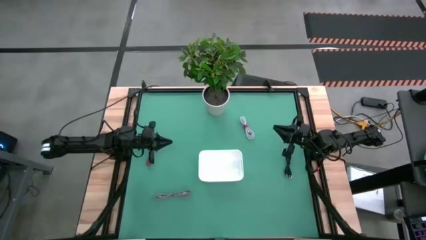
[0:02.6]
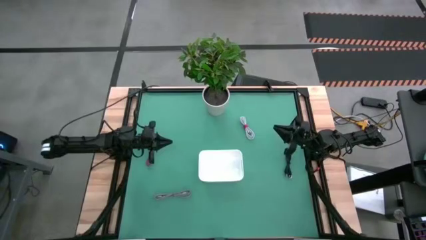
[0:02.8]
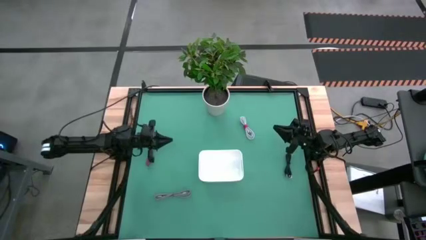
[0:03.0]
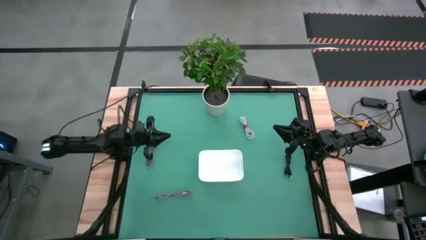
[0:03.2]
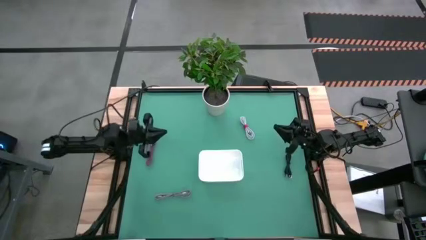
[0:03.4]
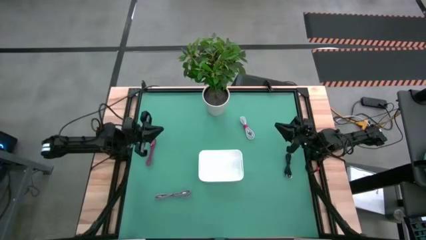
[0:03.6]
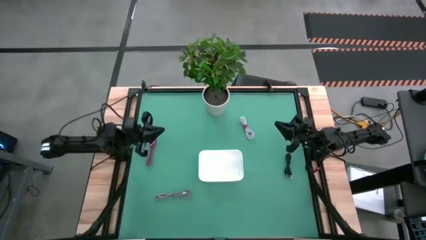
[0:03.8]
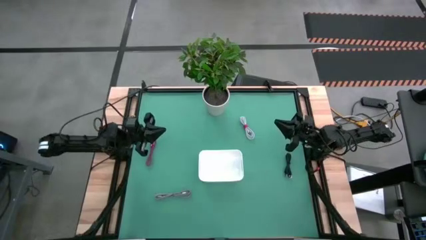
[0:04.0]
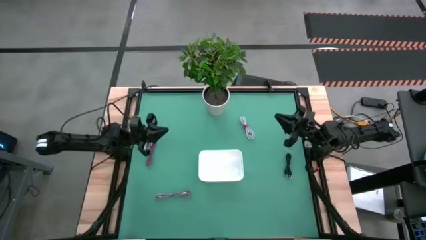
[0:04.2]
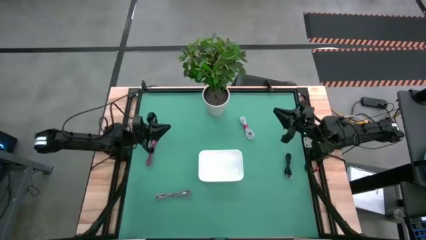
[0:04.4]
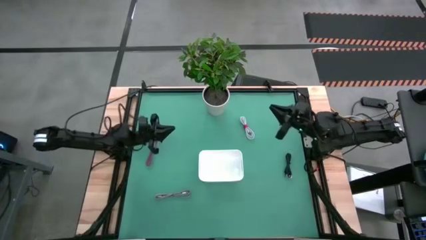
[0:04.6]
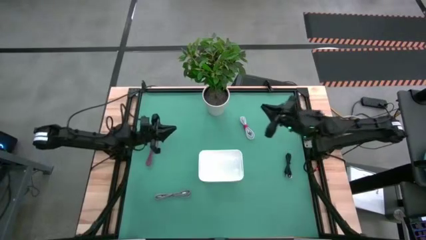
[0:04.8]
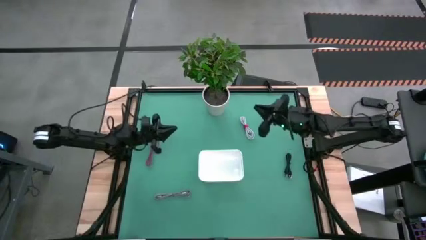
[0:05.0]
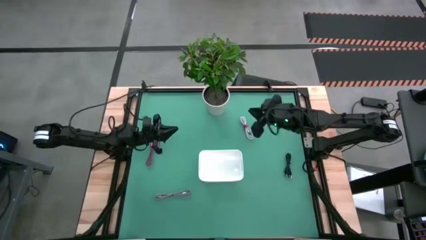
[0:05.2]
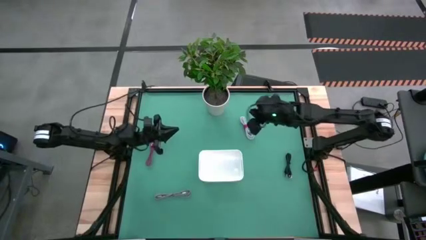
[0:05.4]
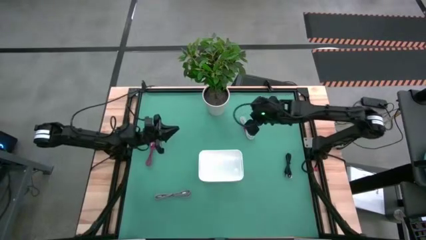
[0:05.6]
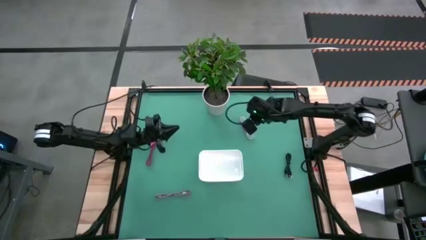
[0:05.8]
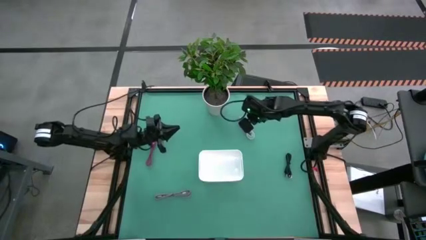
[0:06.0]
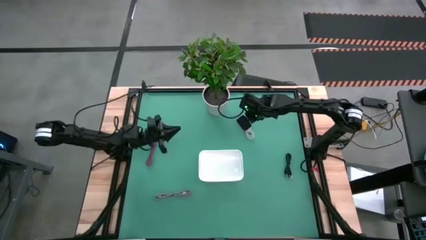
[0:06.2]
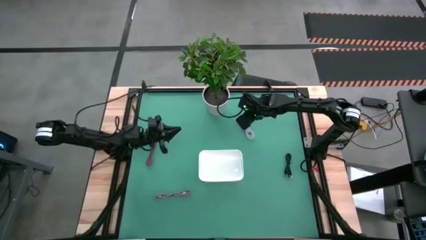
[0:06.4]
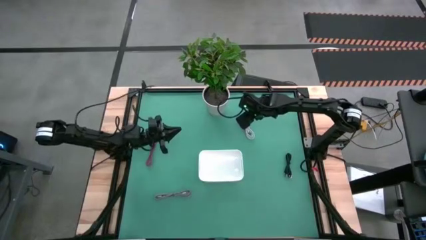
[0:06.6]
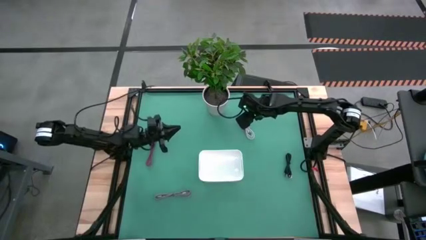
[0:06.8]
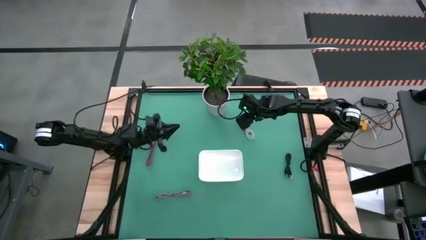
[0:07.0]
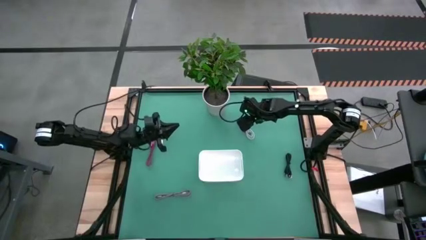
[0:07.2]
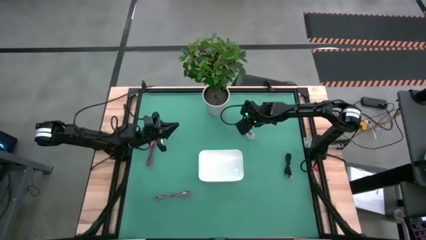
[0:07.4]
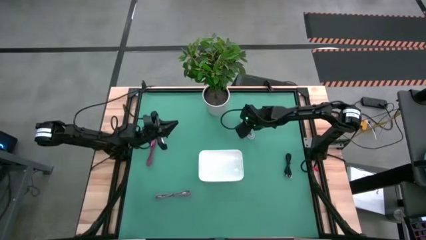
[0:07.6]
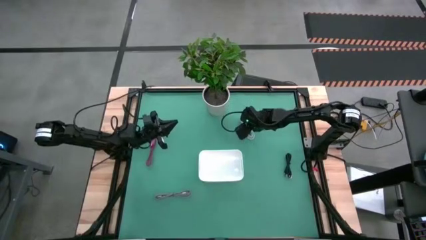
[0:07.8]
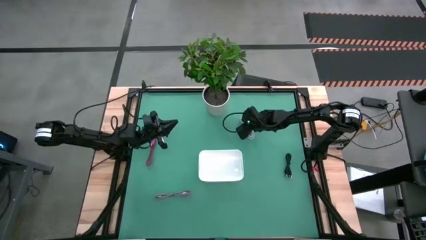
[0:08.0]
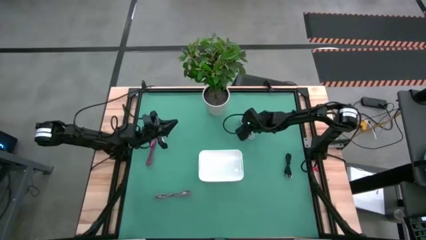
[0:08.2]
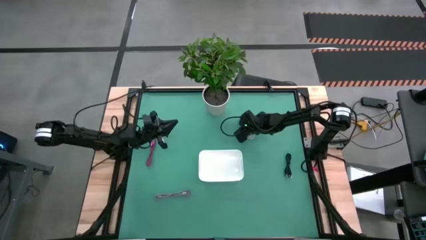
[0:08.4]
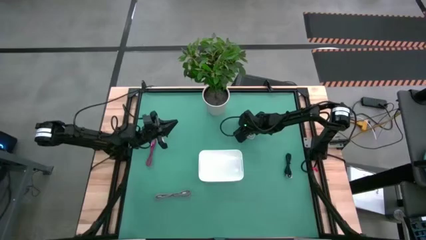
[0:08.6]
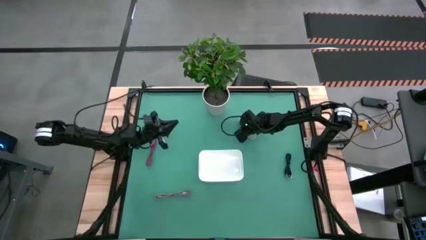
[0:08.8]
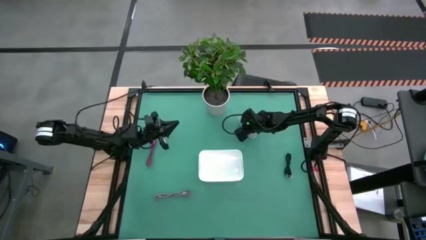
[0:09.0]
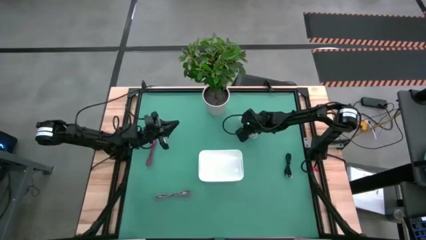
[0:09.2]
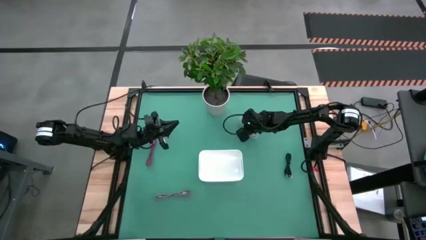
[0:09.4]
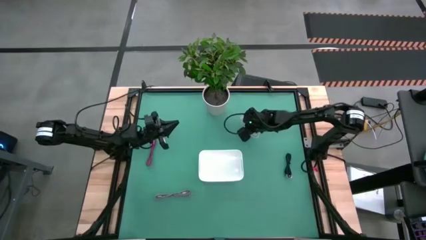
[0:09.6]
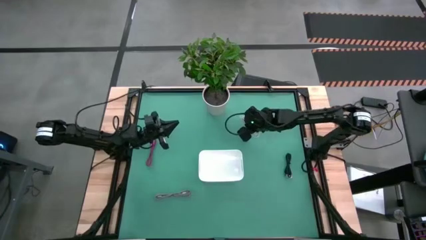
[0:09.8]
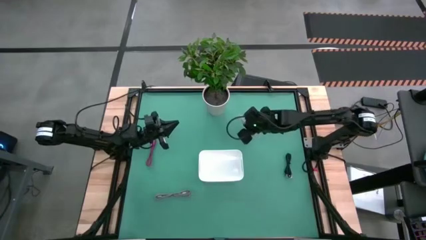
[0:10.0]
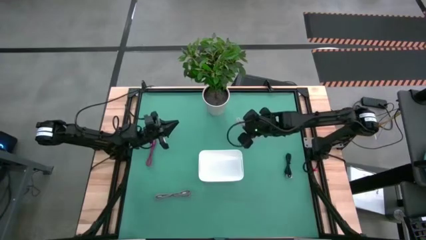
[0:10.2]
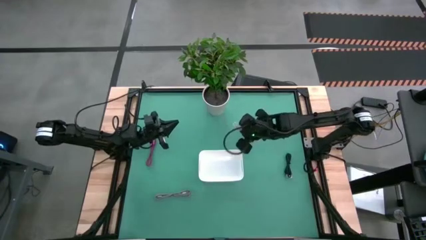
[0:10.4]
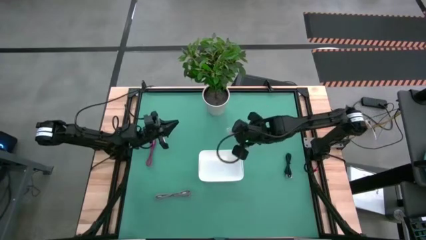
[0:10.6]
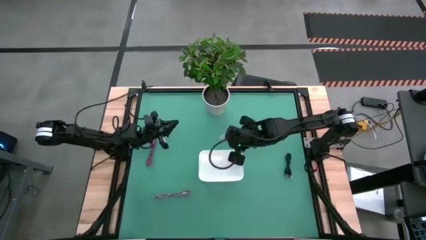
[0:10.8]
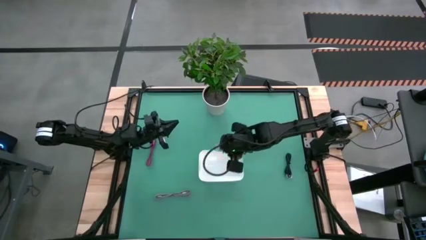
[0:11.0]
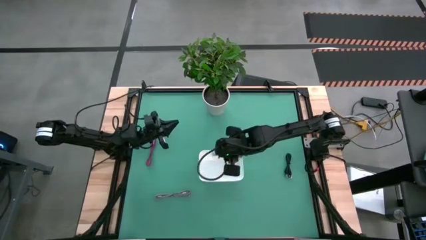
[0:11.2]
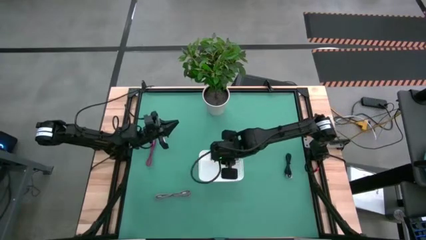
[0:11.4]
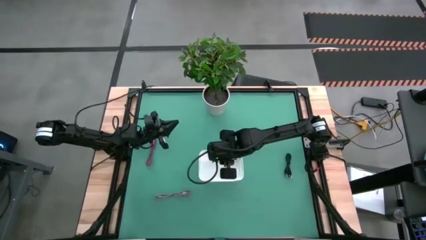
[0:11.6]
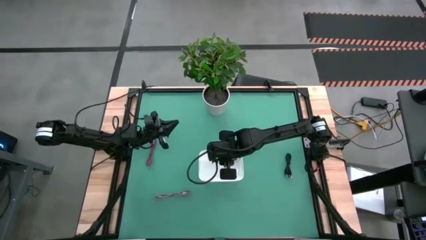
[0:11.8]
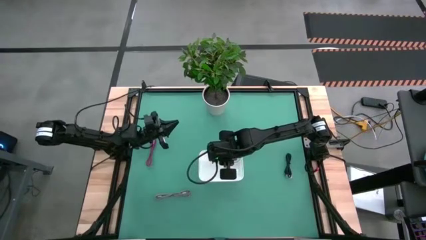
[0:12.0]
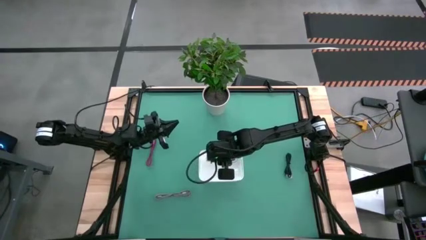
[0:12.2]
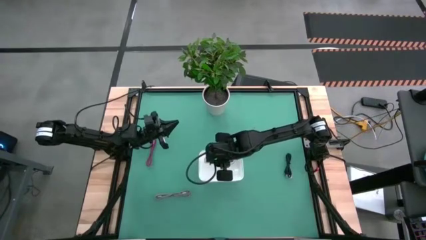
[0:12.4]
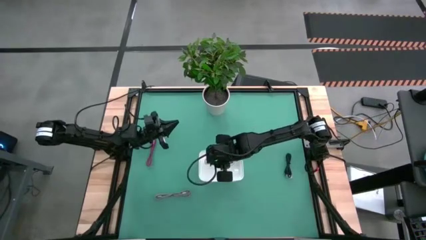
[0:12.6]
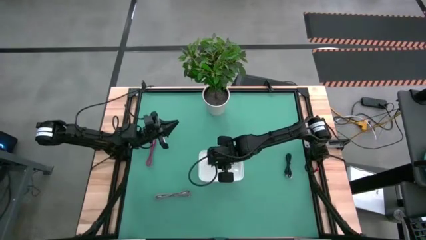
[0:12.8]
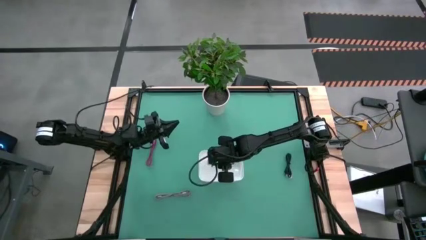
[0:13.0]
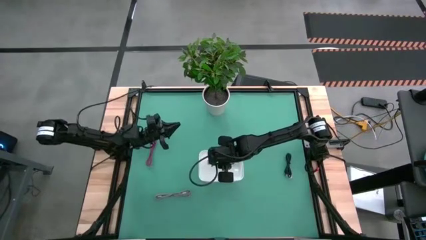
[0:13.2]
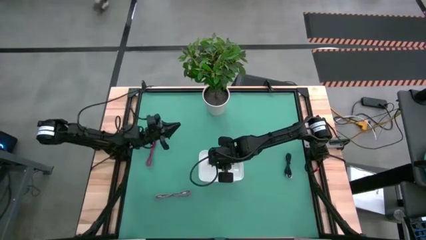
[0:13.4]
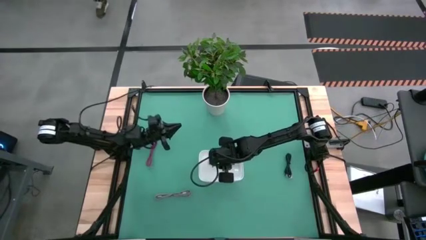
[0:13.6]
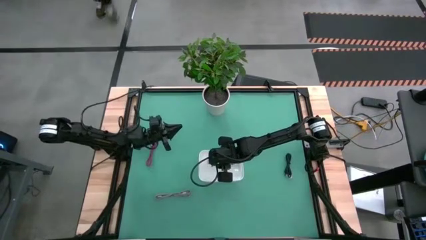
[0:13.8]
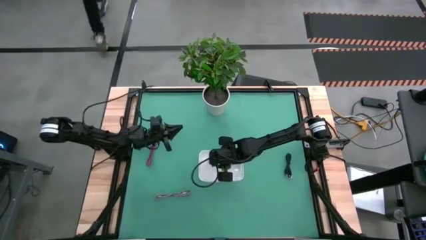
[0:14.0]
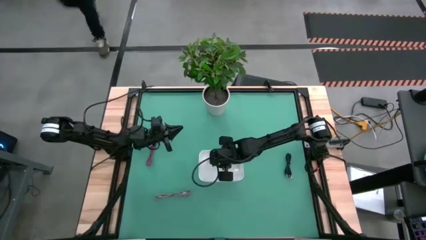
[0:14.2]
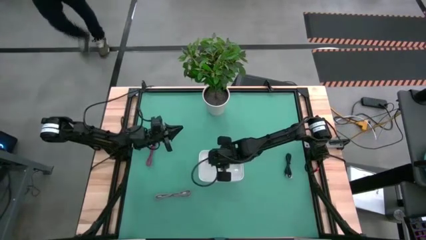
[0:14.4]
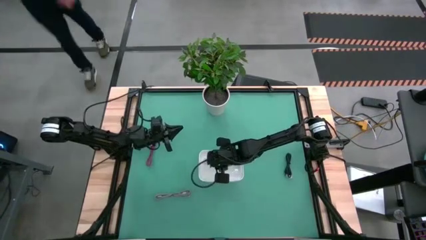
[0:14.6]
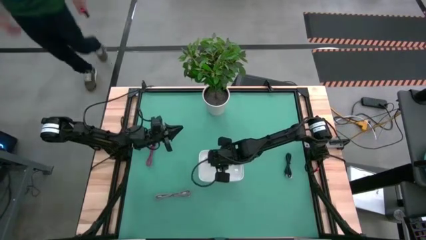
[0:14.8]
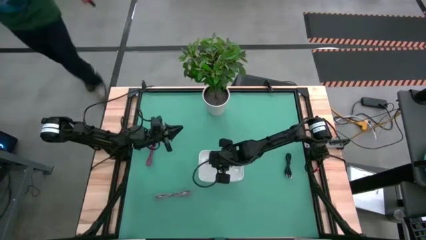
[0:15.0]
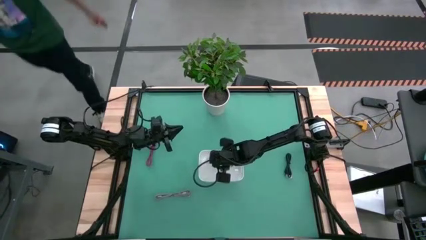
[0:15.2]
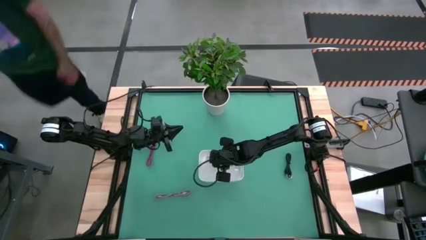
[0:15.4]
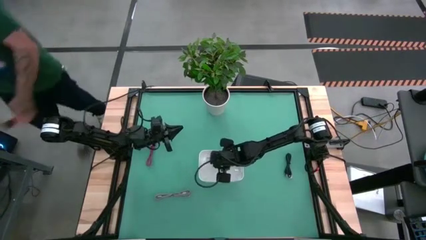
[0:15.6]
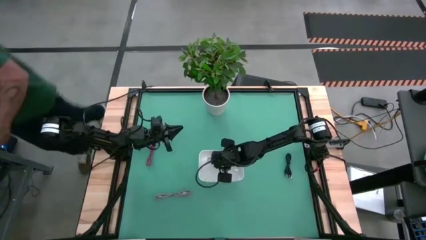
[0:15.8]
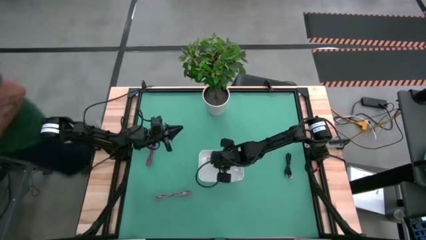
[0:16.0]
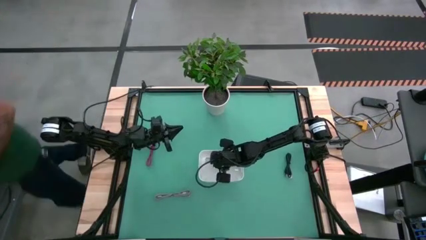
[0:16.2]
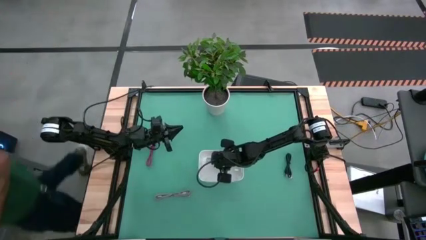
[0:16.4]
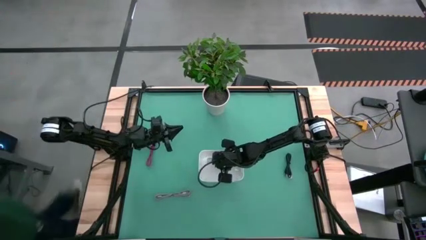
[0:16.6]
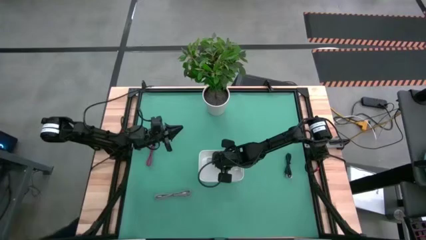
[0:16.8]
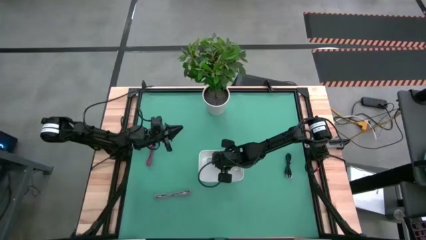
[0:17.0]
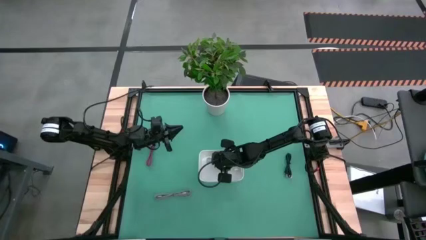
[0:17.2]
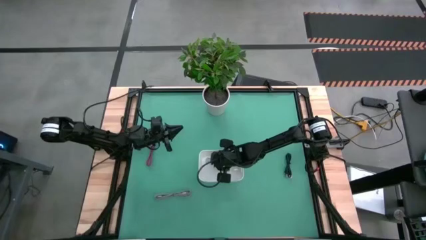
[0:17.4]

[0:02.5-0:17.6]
Task: Pick and place USB-C Cables
Put the white charger cable into the white bin
